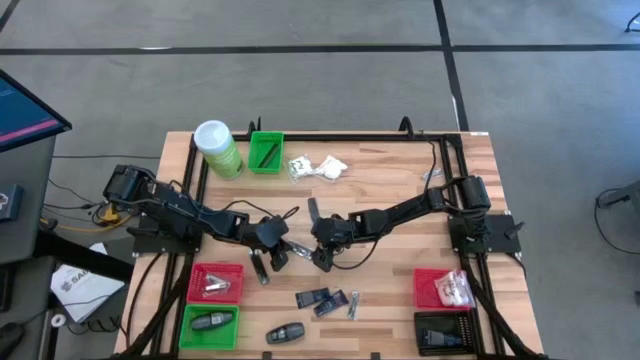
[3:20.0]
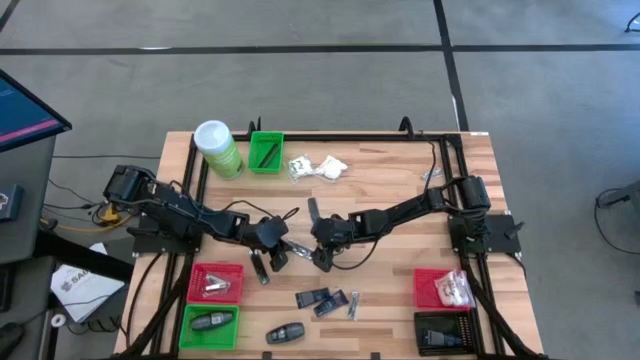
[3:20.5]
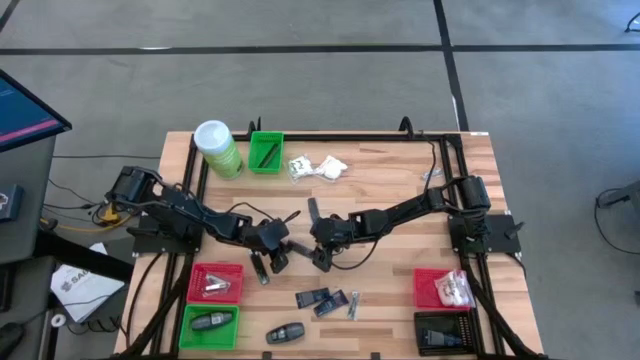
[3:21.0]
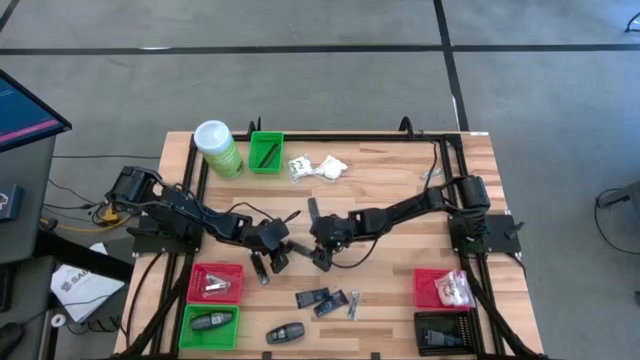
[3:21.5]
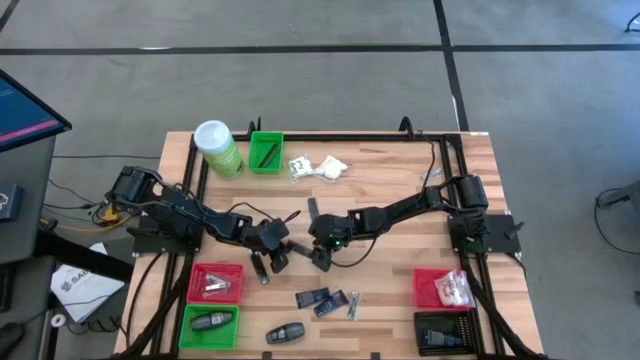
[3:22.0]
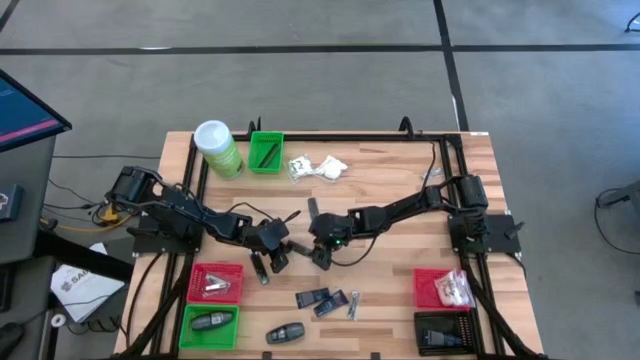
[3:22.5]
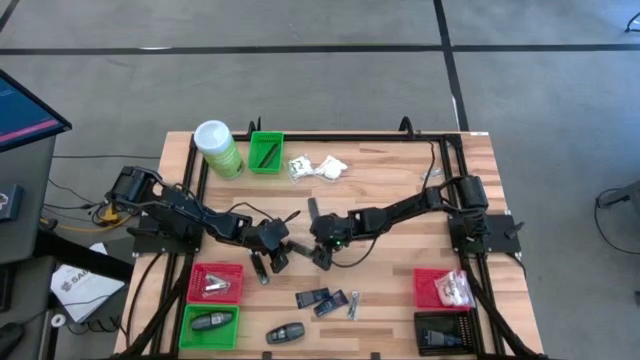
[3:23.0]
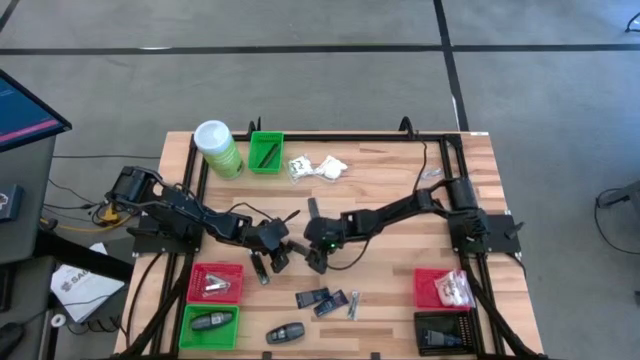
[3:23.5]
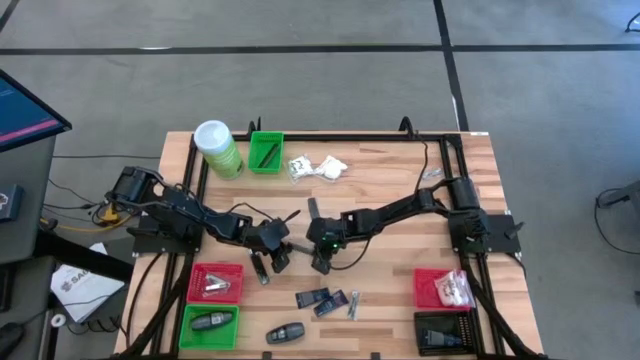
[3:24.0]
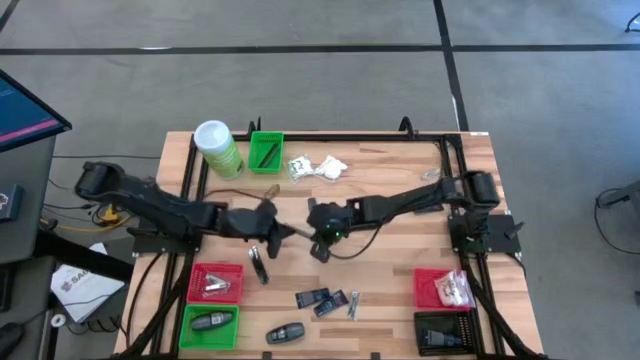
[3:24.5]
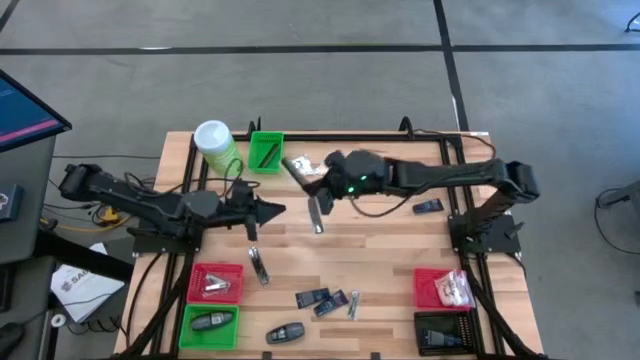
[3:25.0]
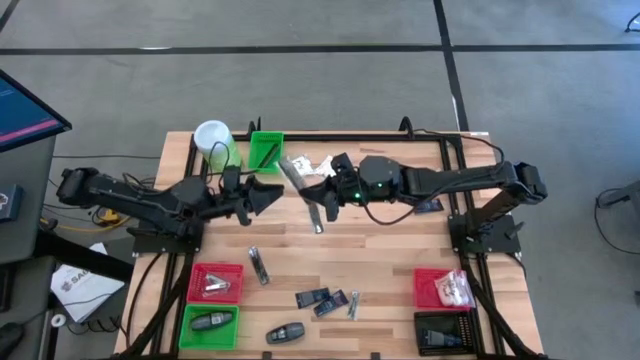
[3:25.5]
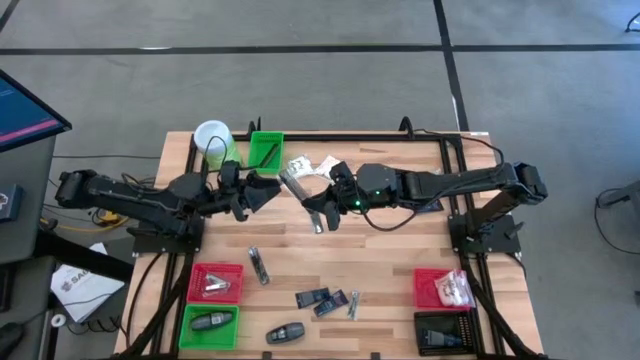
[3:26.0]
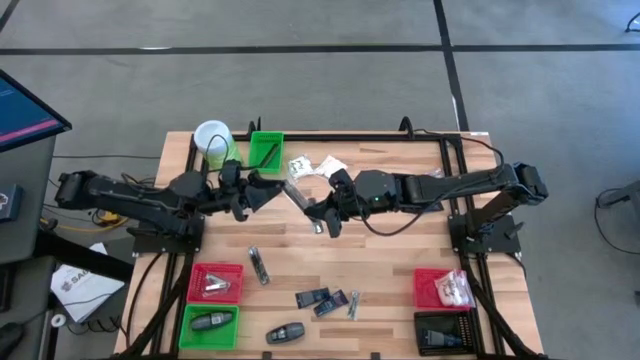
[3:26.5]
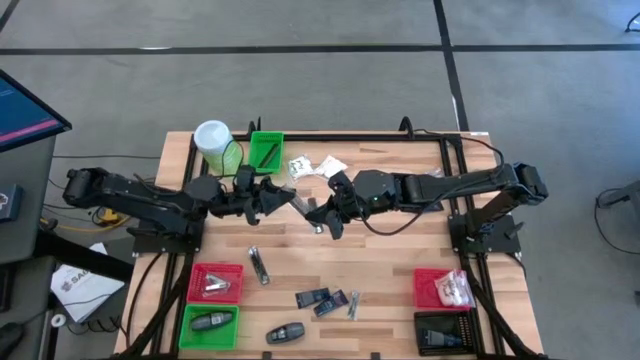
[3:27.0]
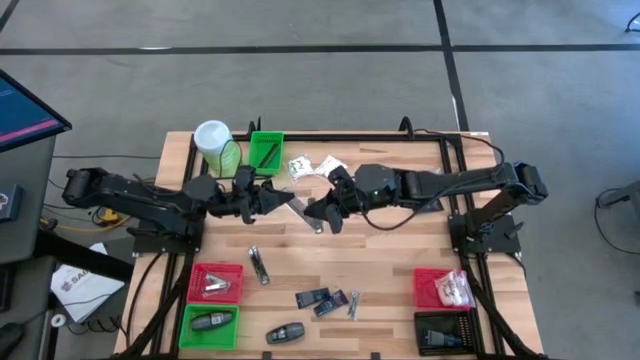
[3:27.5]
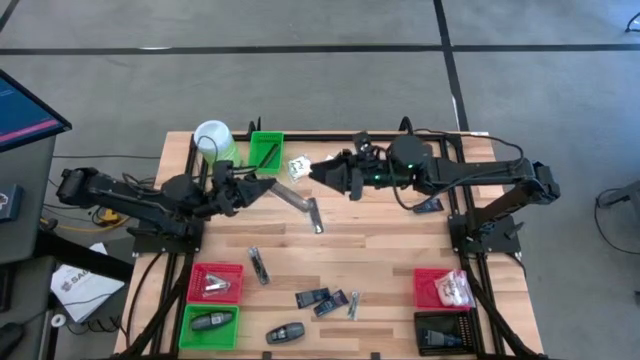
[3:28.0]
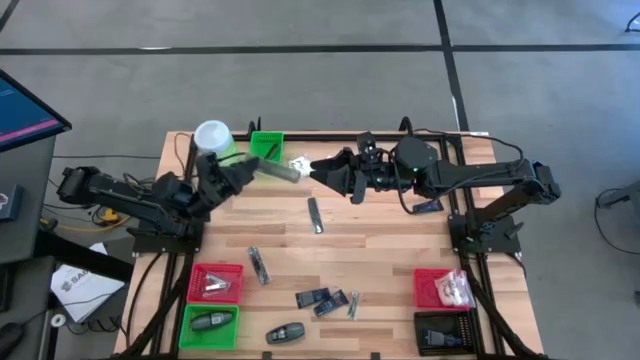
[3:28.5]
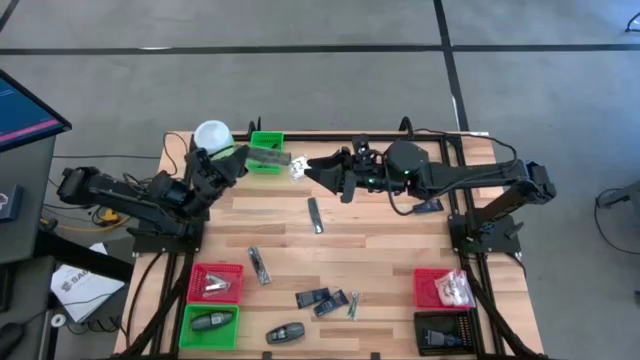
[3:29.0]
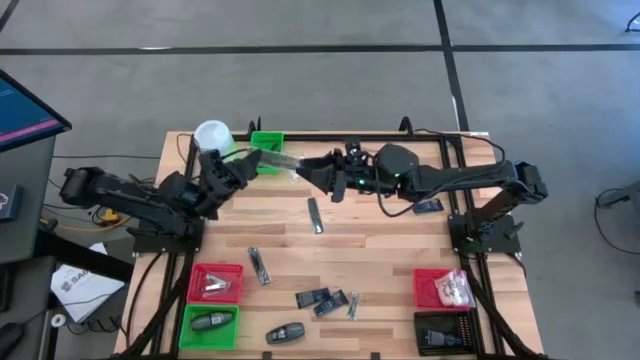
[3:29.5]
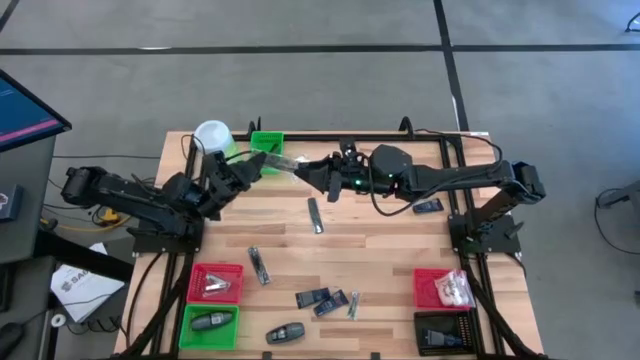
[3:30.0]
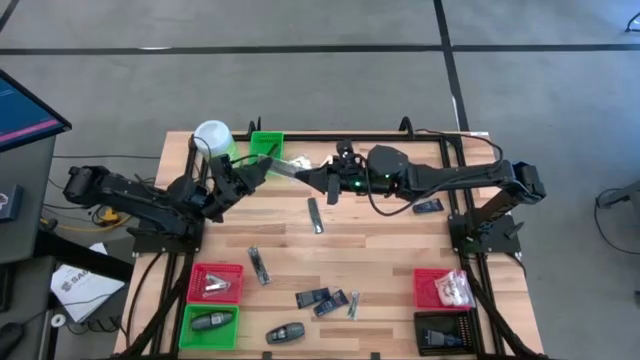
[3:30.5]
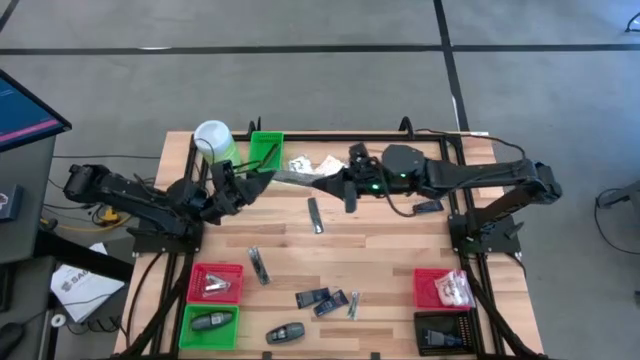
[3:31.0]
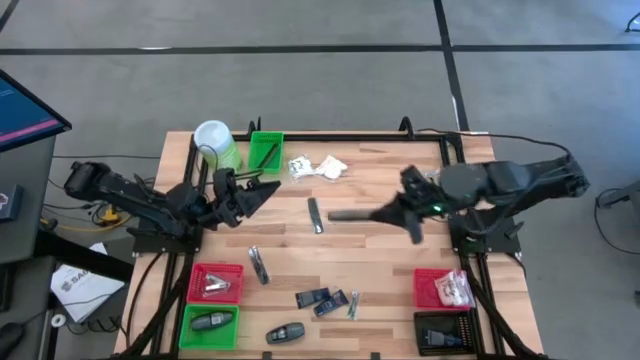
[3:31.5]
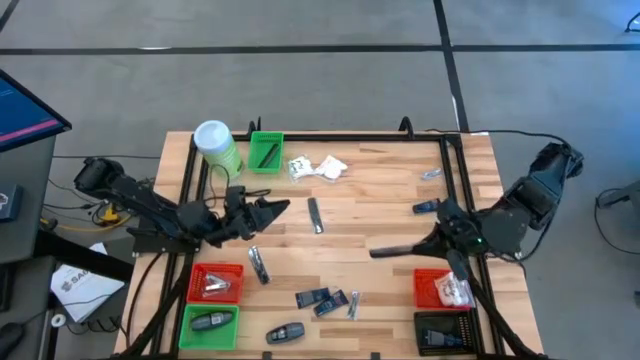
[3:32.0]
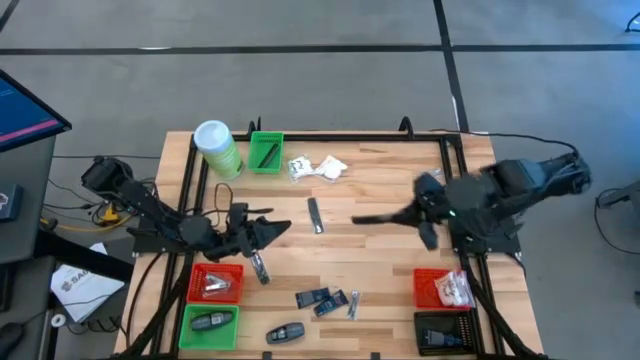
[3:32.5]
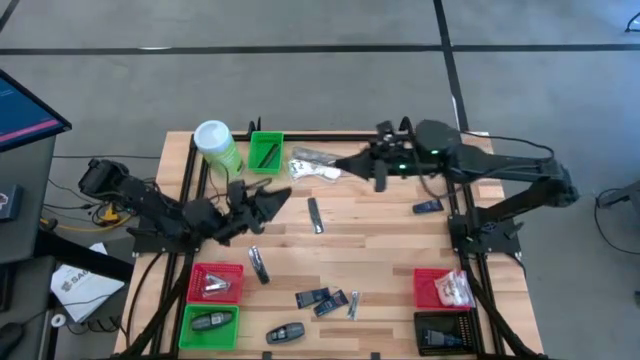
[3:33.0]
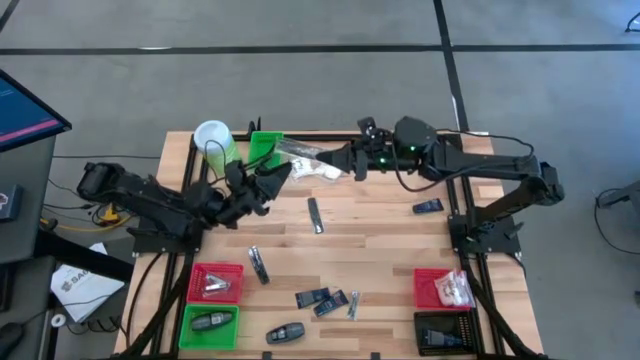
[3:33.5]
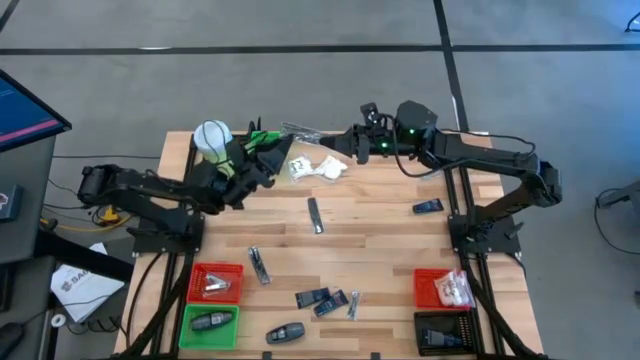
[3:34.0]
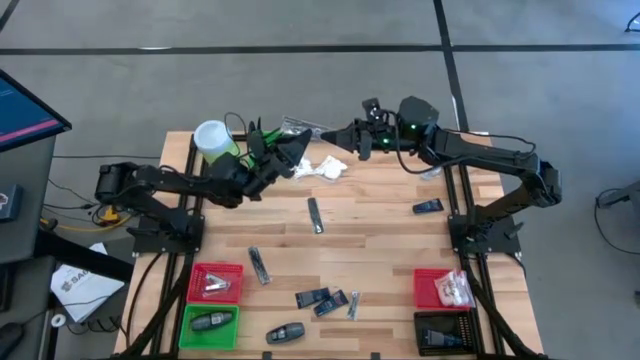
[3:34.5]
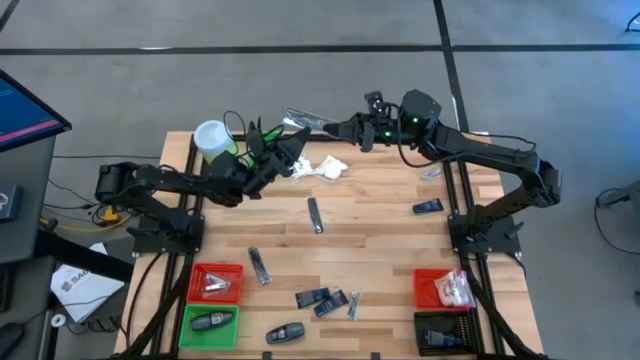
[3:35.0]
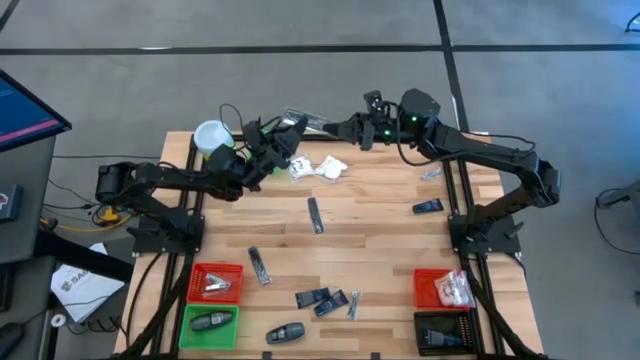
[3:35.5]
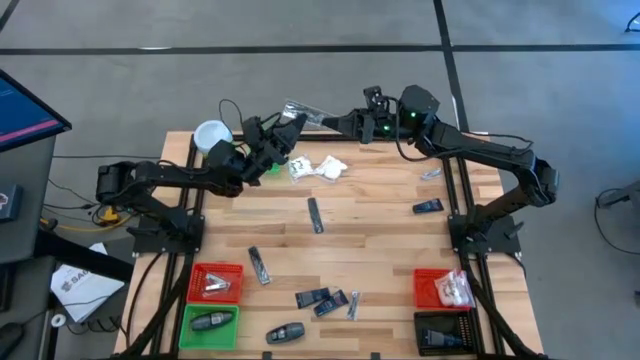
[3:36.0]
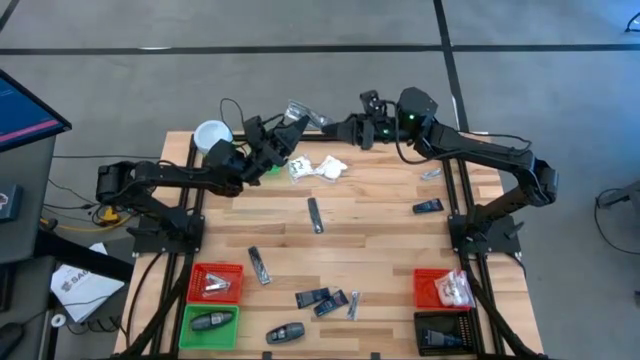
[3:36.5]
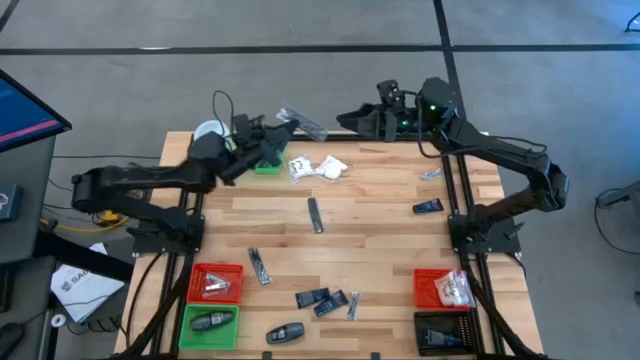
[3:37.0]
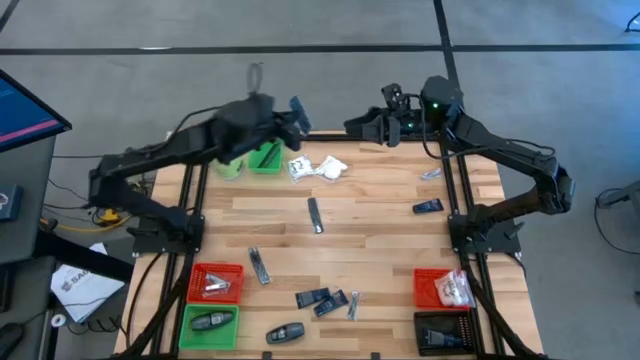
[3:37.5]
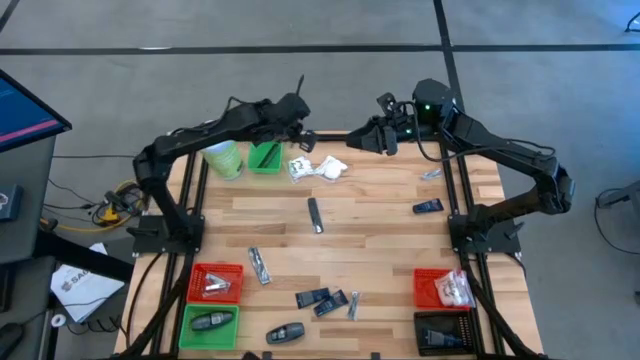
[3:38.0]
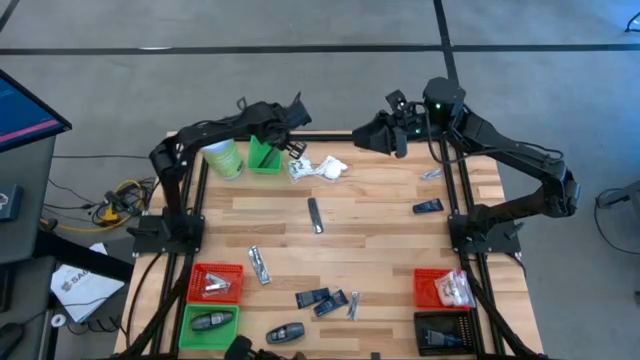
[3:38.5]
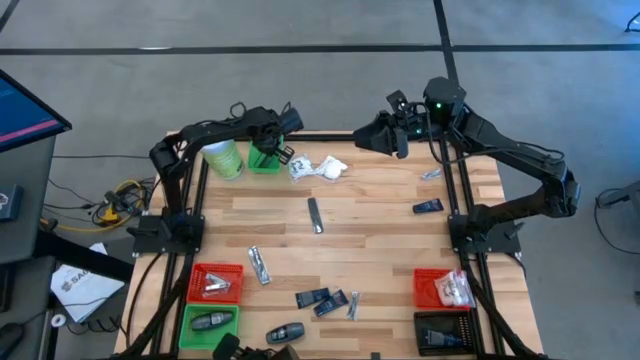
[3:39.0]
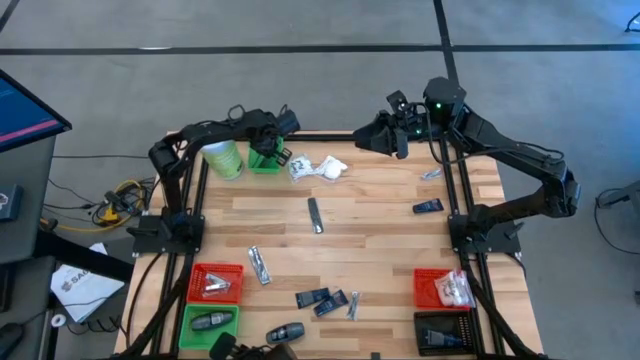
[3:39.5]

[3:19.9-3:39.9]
Task: Pick & Place Travel size toiletries
Put the black comb into the top green bin
